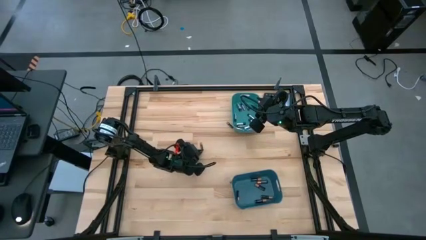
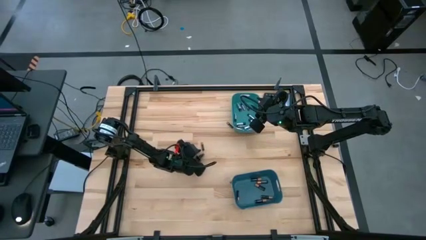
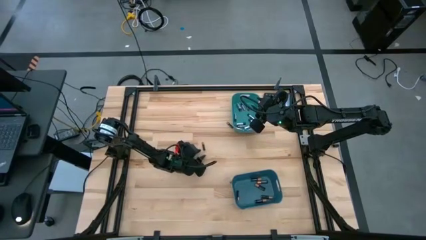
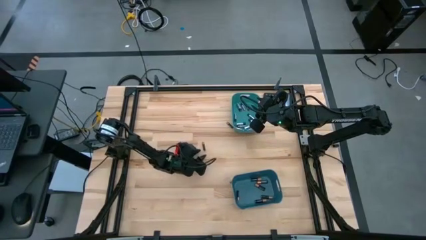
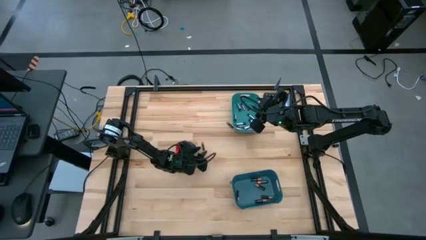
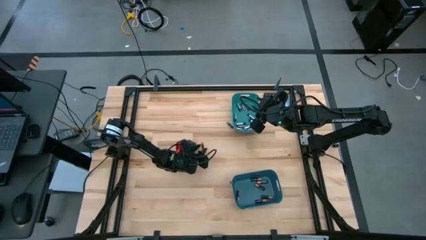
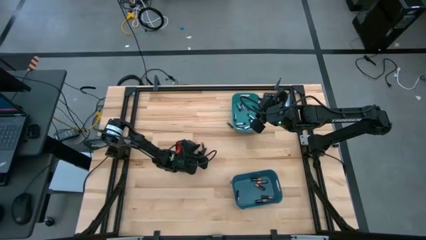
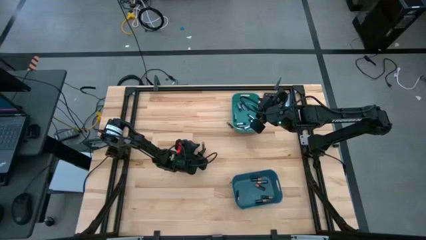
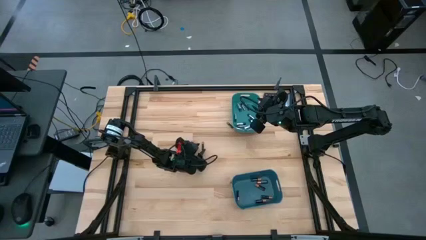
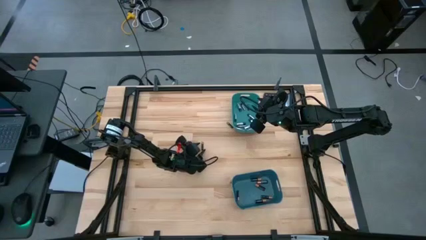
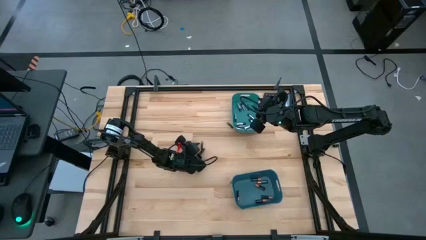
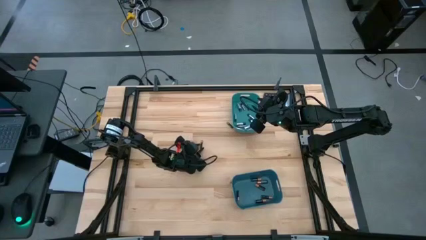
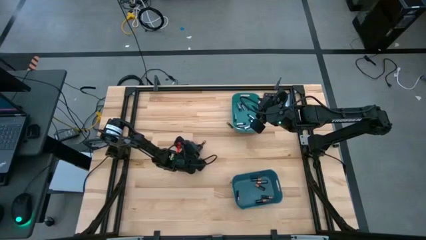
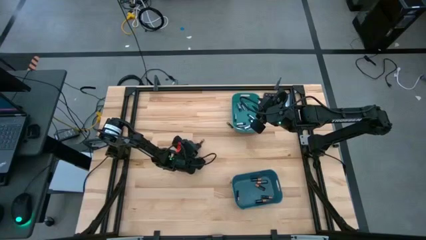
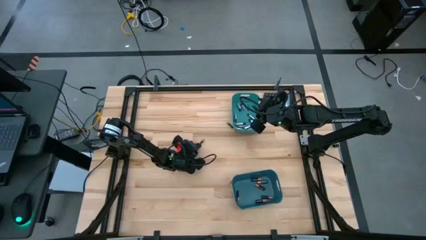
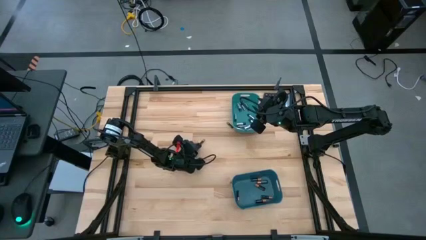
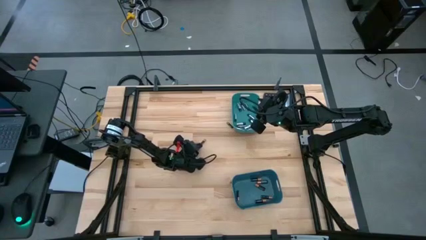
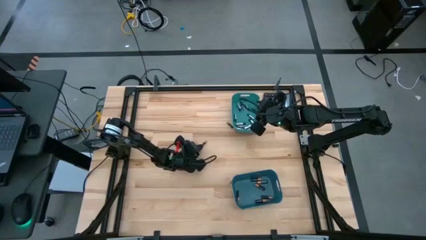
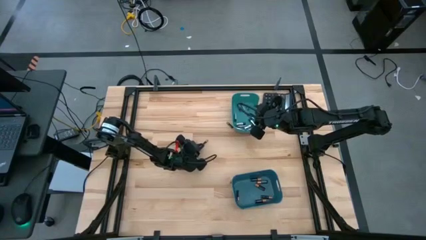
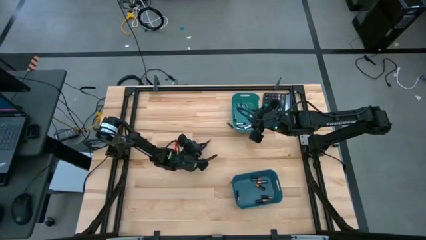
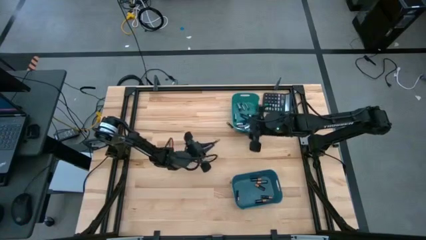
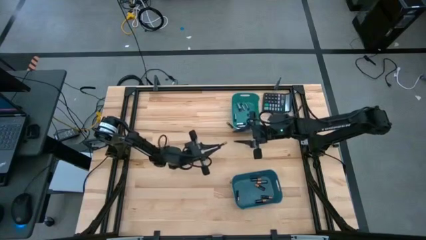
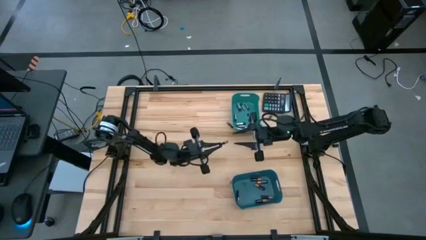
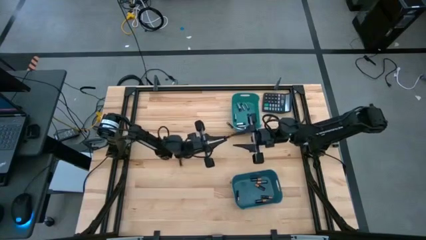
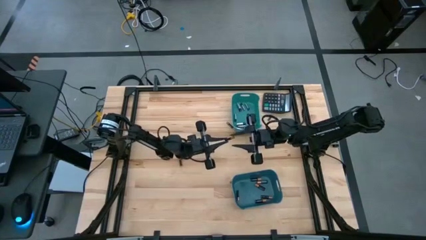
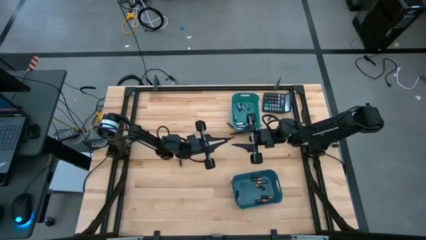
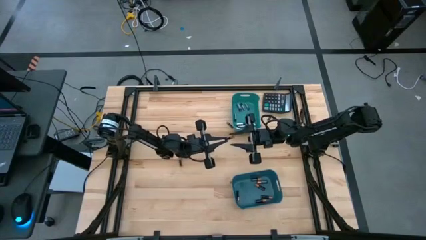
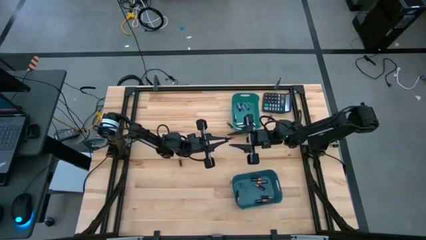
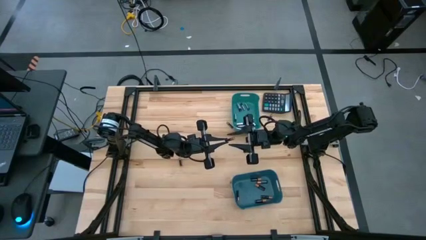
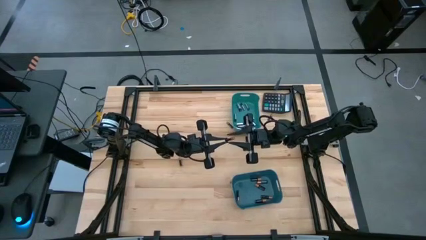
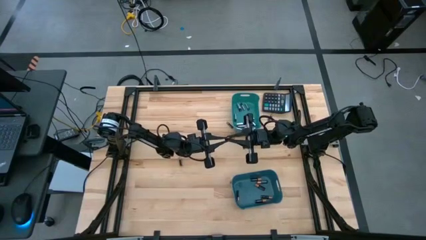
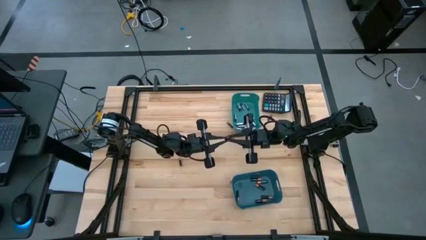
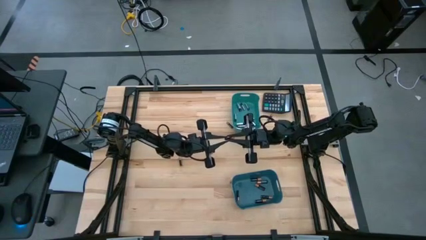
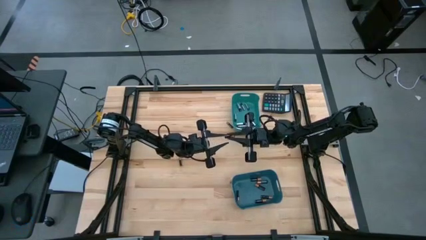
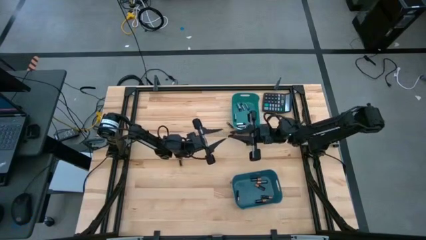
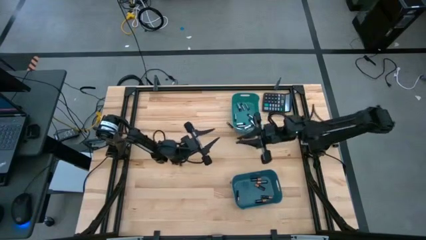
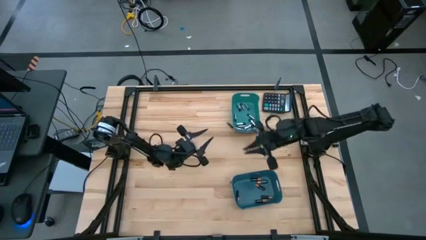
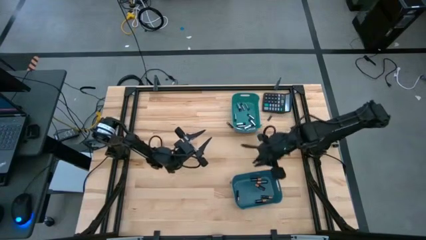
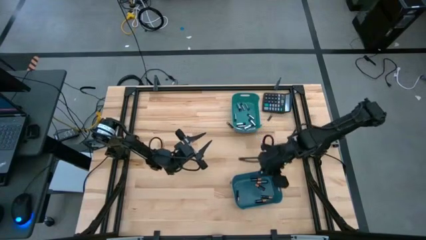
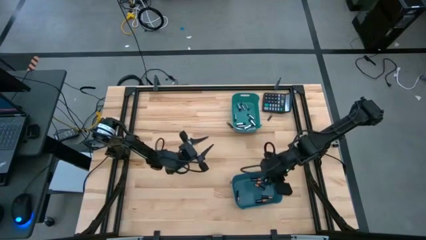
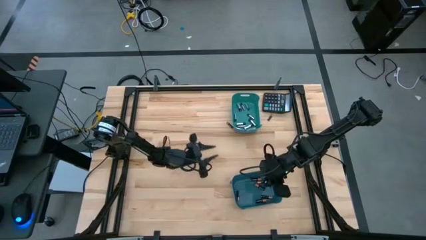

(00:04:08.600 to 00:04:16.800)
Task: Sort batteries
Put the black battery into the blue bin

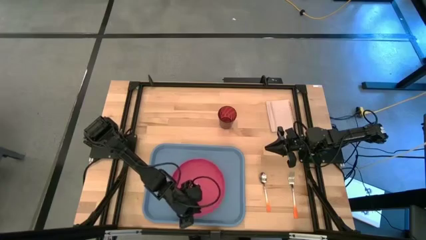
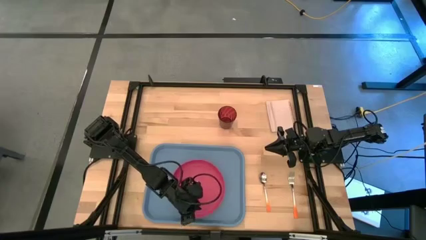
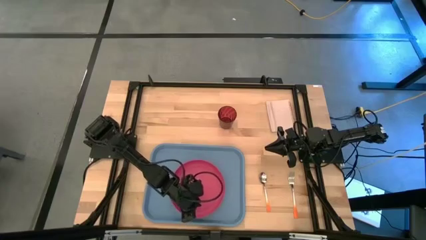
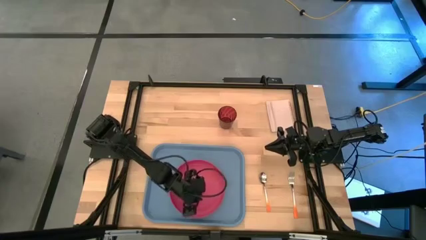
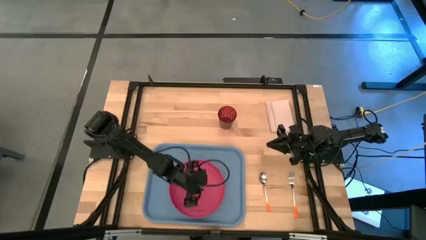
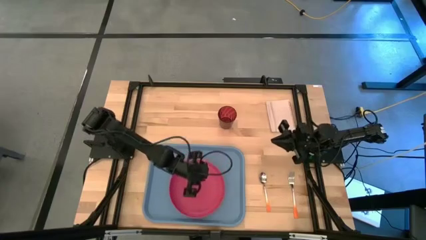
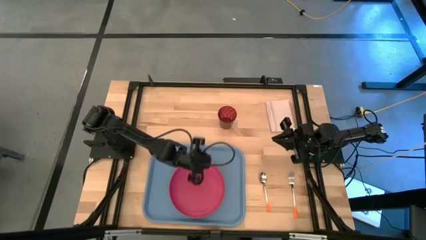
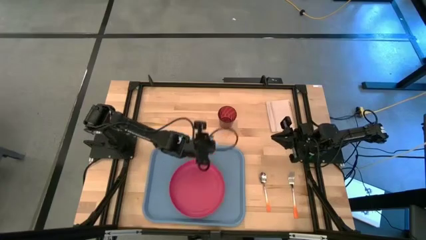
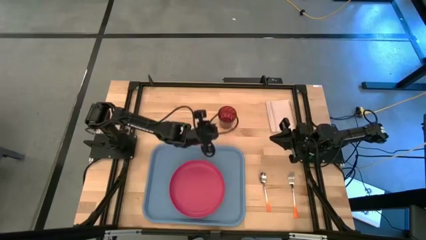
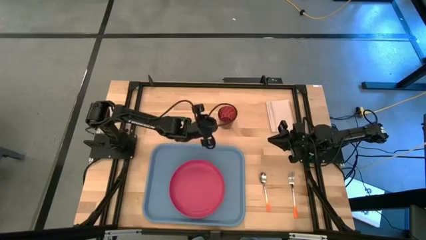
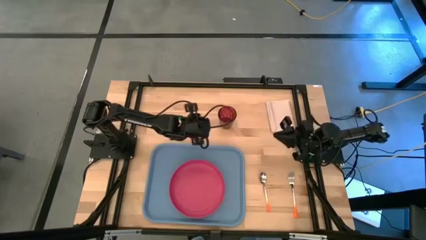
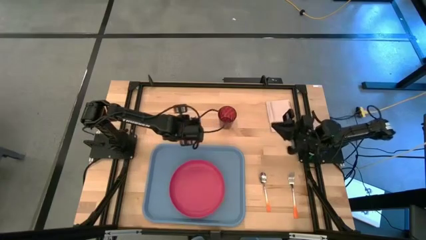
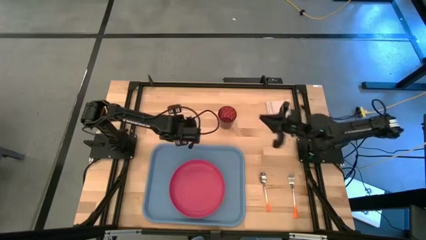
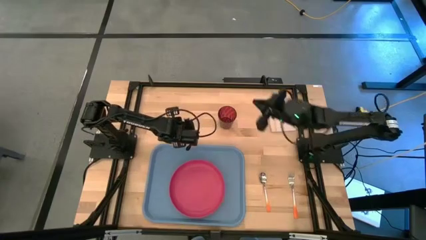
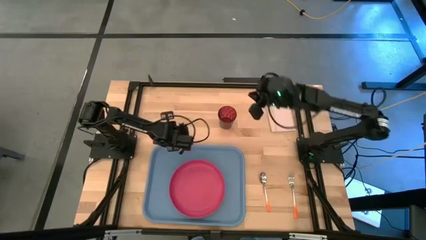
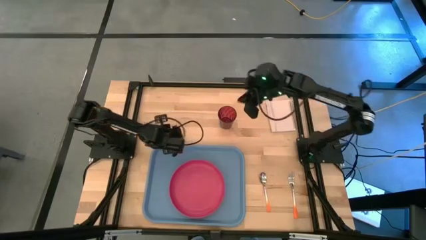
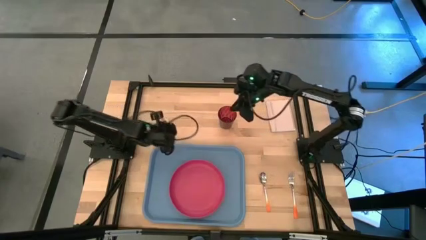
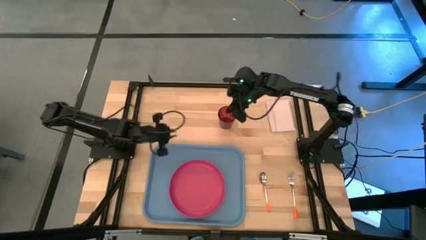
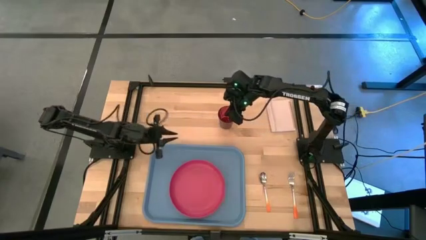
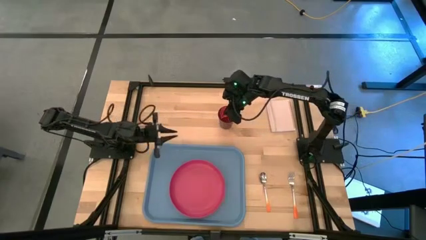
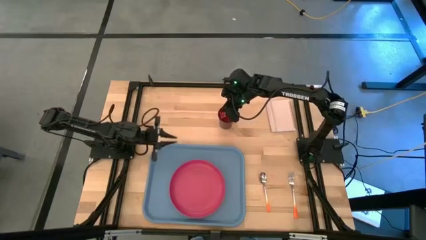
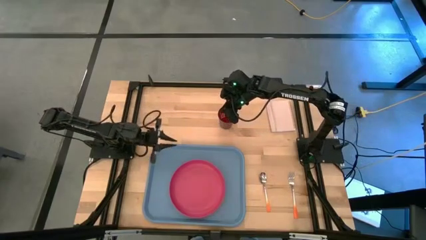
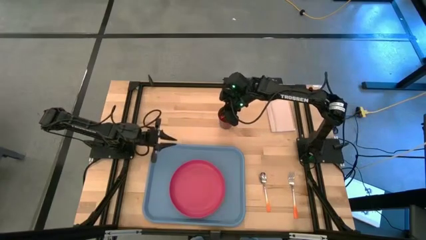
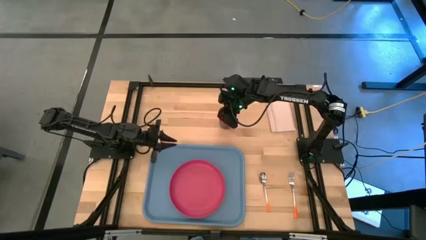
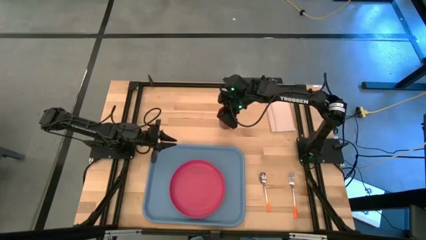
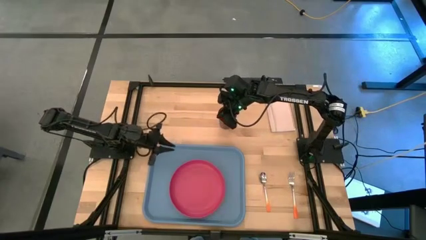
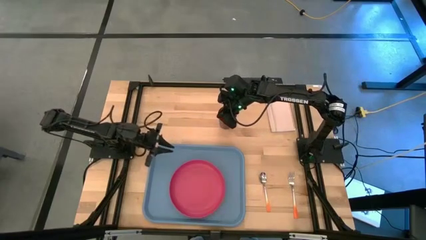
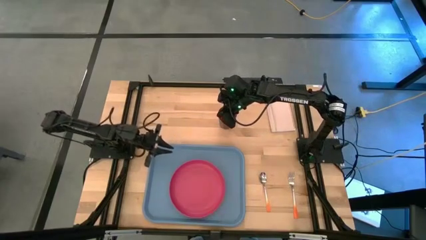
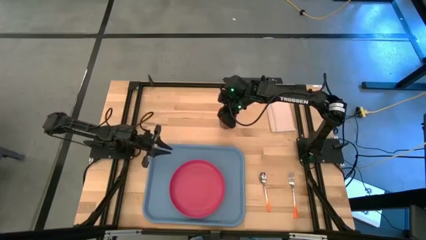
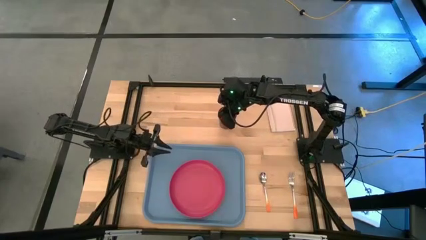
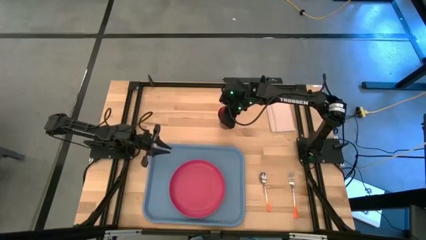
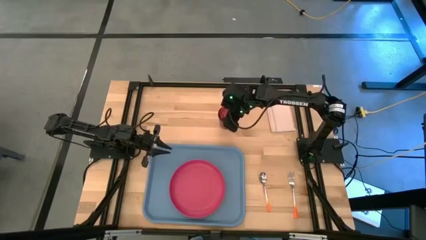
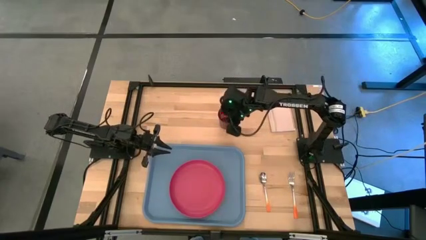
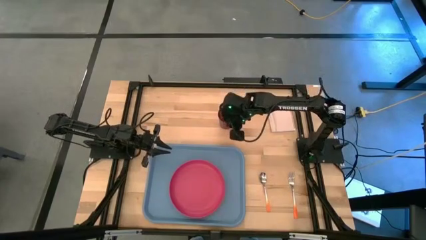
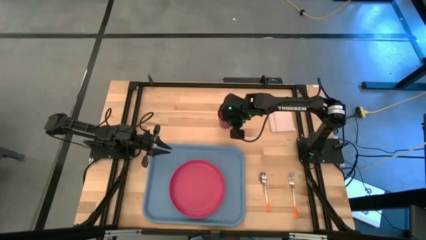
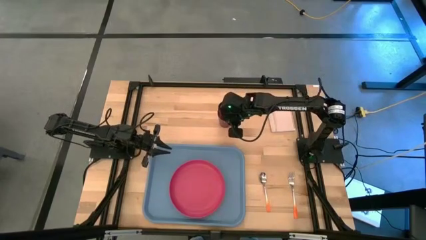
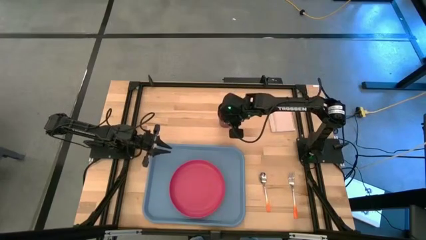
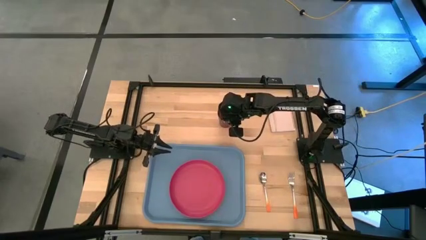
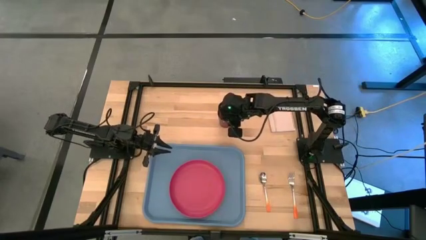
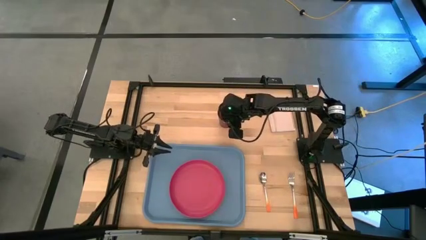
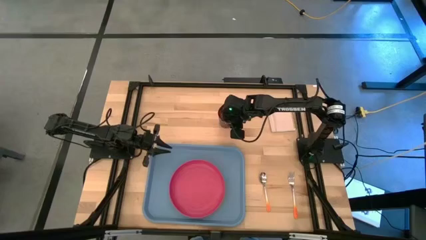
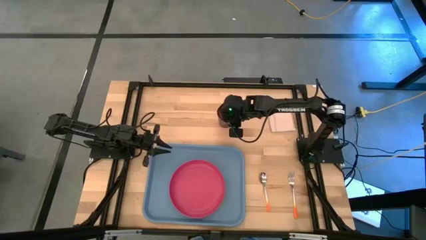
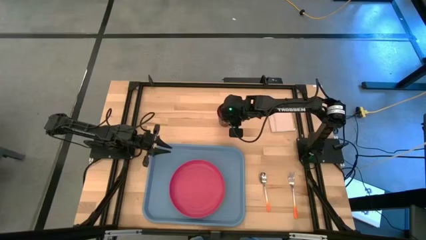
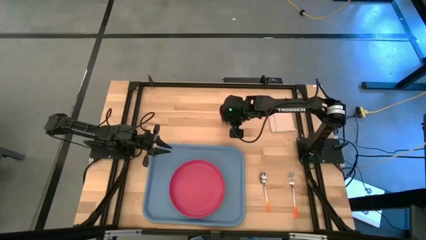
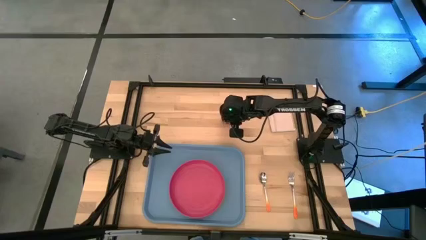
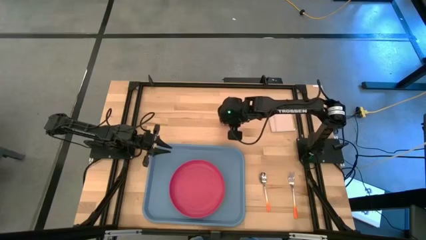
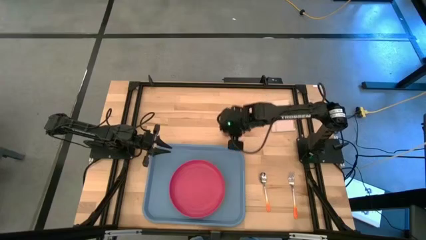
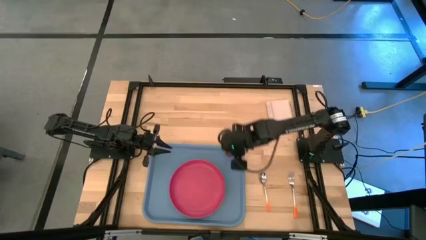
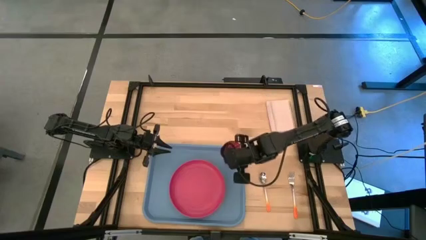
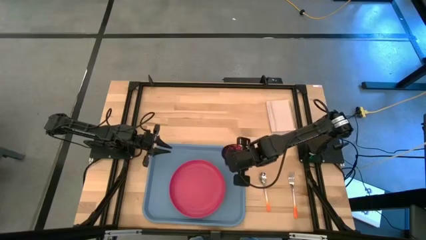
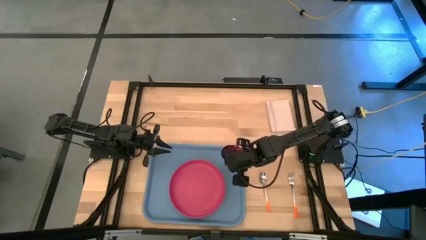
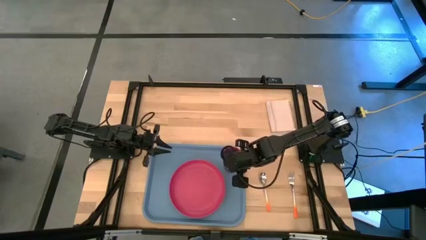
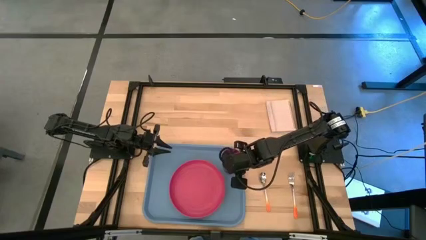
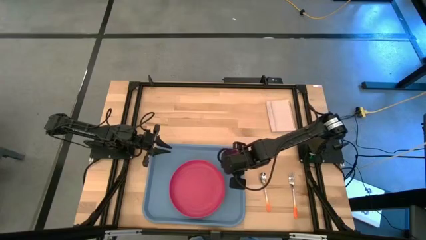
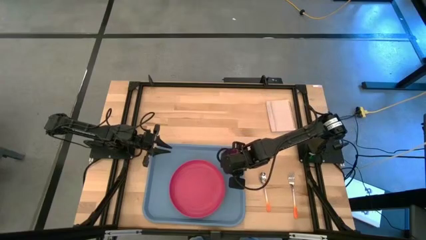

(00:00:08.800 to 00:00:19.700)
Task: Pick and place plate/cup/fork/spoon on tray
Put the red glass on the blue serving tray to the top right of the pink plate
